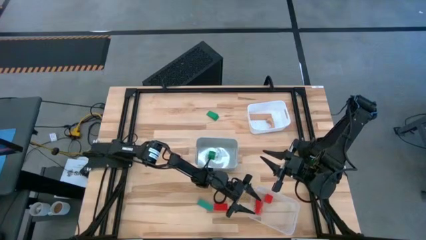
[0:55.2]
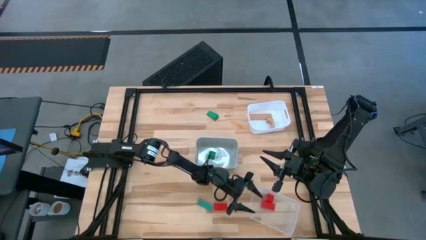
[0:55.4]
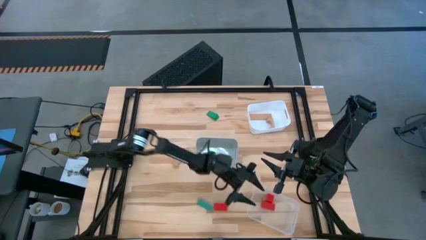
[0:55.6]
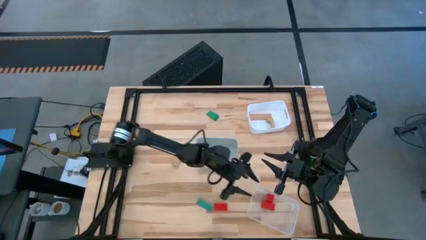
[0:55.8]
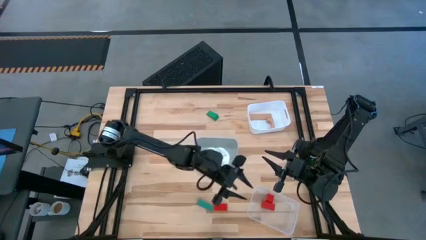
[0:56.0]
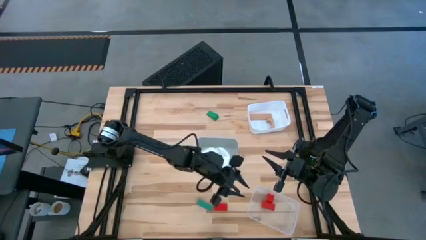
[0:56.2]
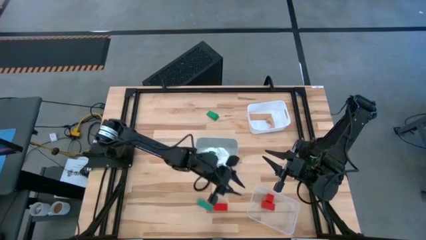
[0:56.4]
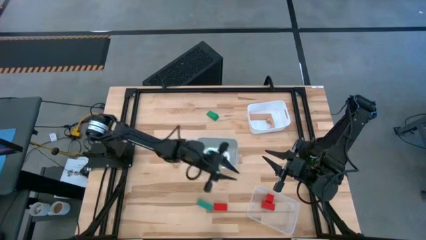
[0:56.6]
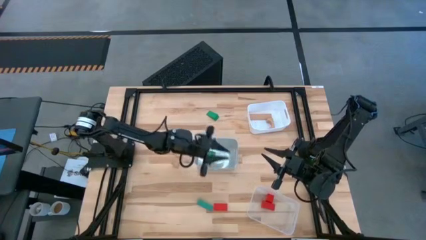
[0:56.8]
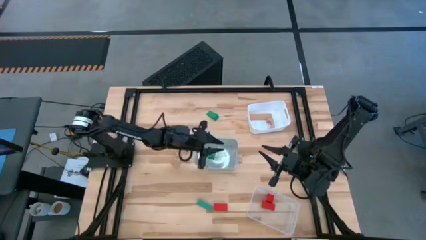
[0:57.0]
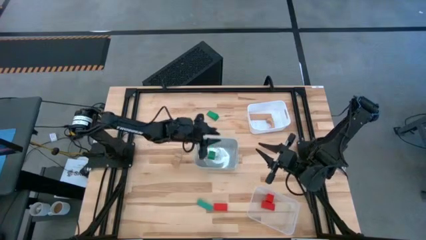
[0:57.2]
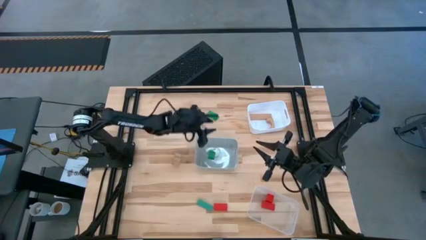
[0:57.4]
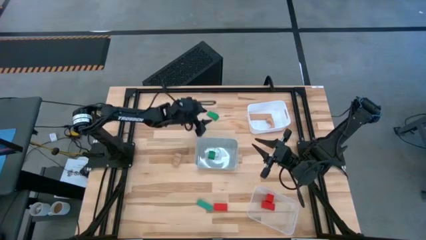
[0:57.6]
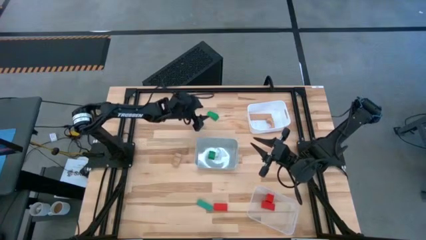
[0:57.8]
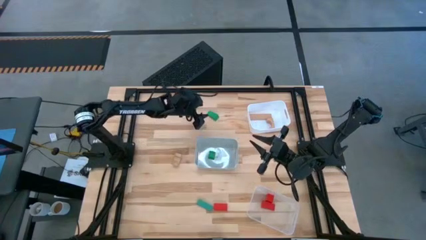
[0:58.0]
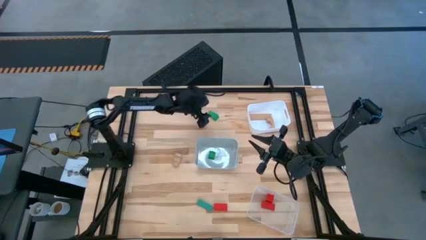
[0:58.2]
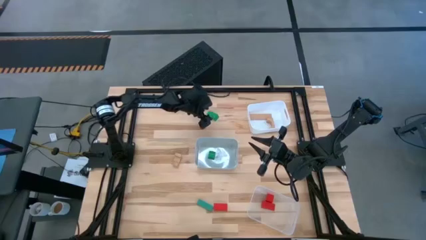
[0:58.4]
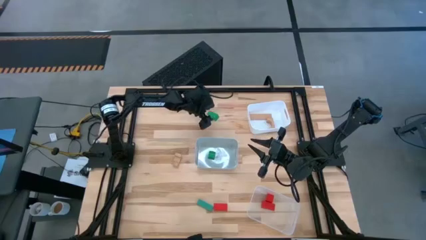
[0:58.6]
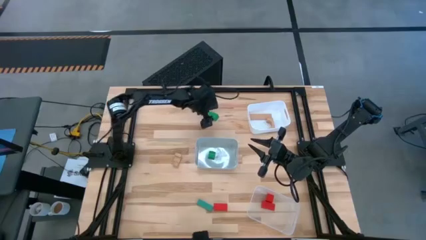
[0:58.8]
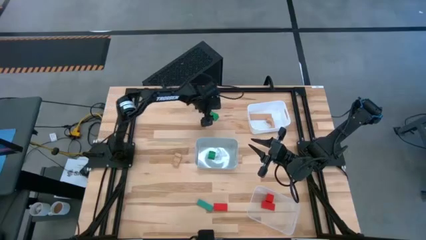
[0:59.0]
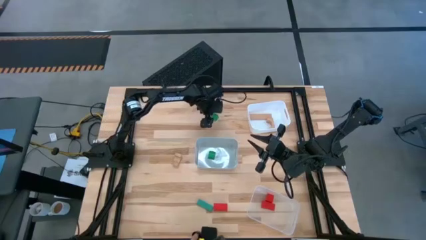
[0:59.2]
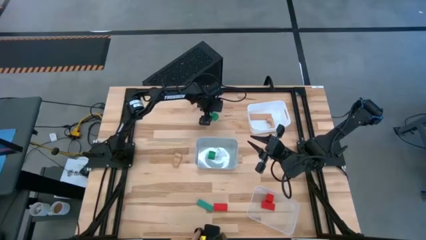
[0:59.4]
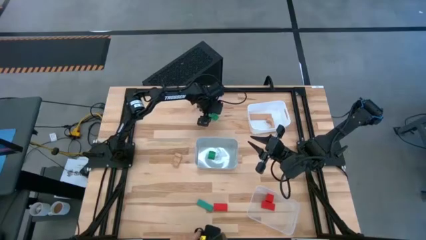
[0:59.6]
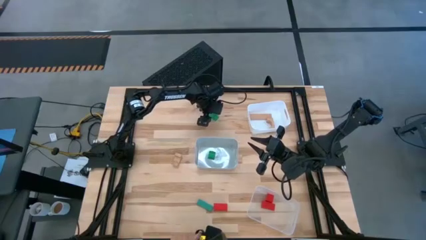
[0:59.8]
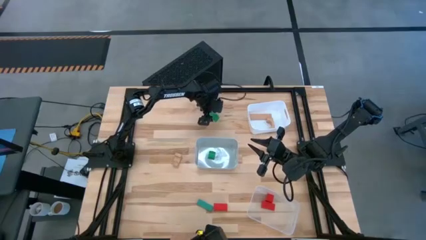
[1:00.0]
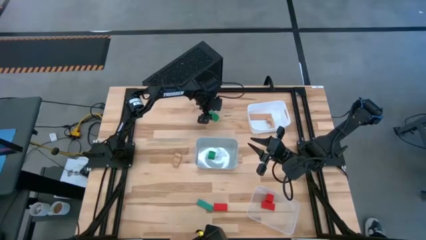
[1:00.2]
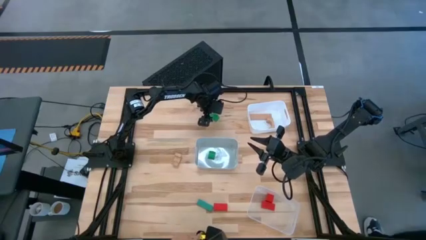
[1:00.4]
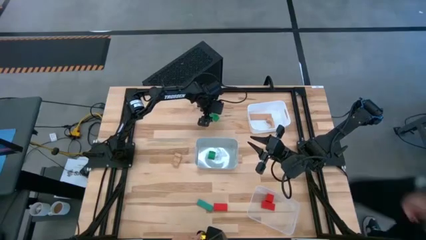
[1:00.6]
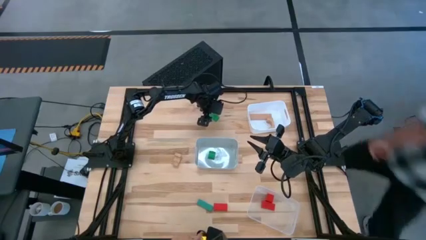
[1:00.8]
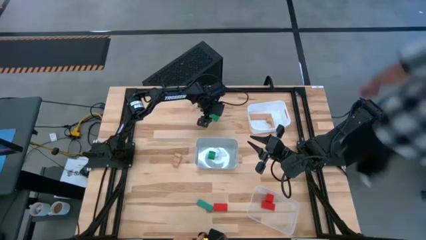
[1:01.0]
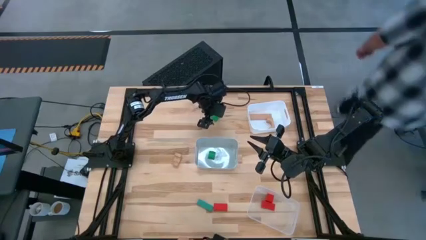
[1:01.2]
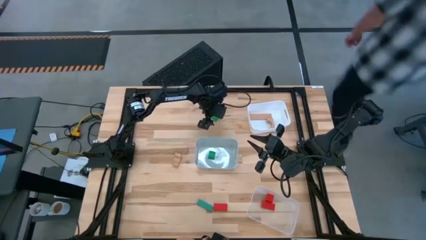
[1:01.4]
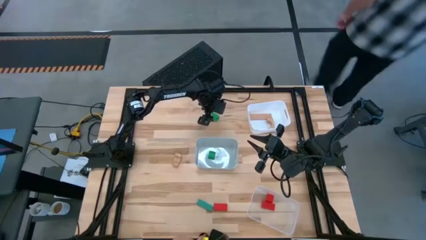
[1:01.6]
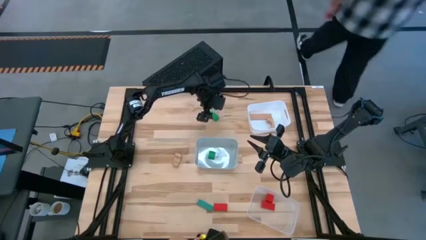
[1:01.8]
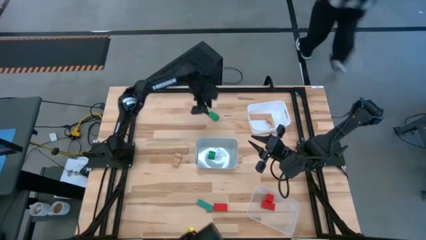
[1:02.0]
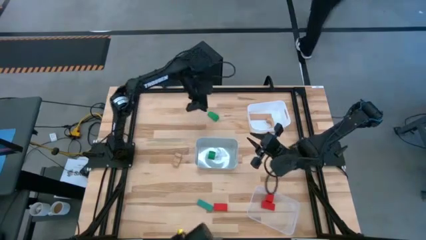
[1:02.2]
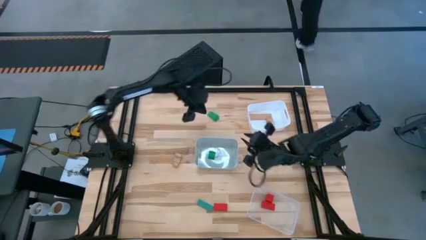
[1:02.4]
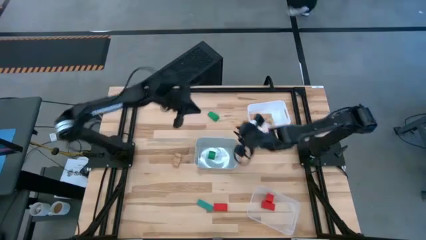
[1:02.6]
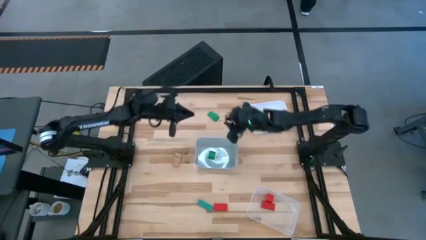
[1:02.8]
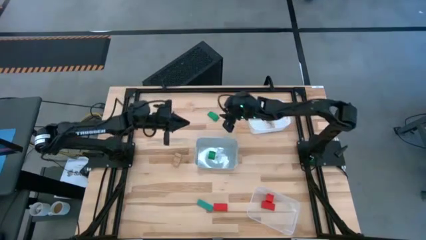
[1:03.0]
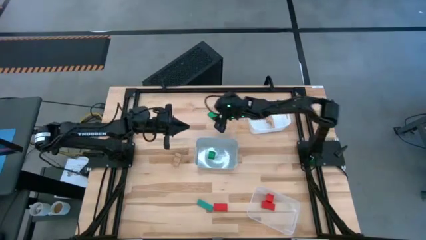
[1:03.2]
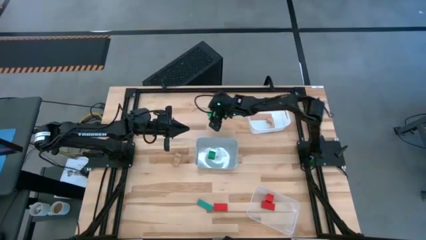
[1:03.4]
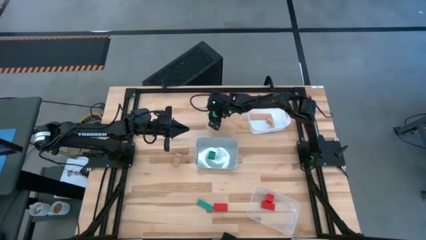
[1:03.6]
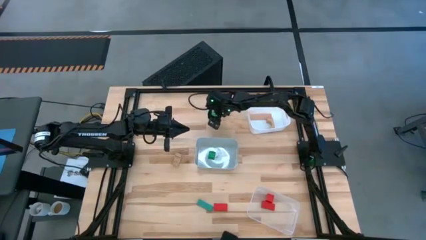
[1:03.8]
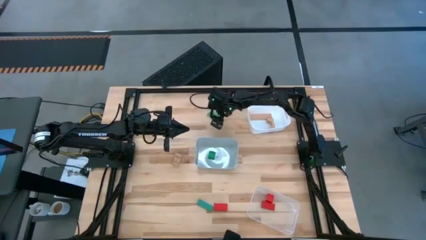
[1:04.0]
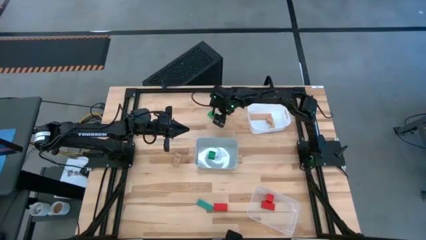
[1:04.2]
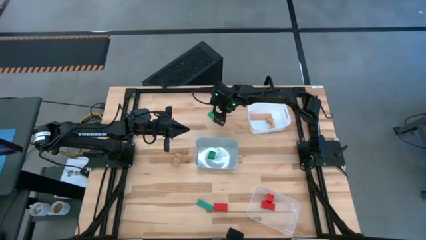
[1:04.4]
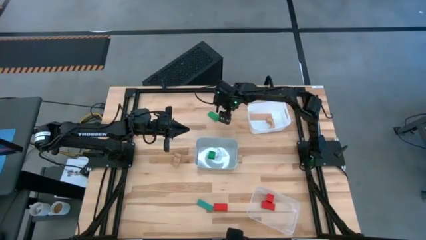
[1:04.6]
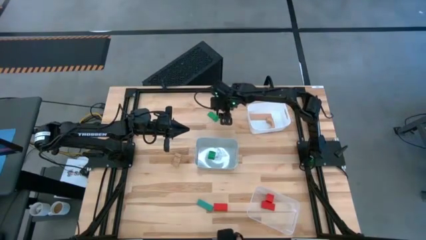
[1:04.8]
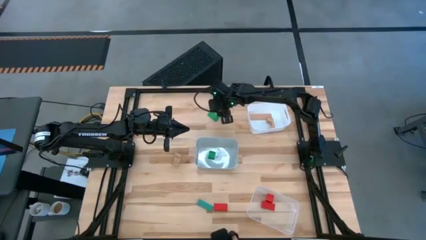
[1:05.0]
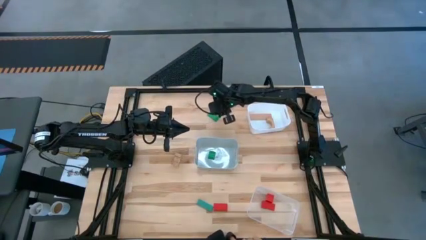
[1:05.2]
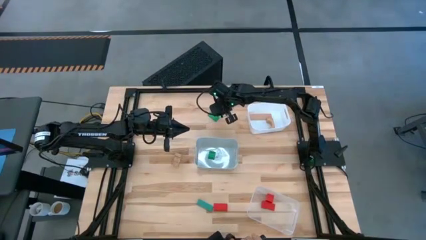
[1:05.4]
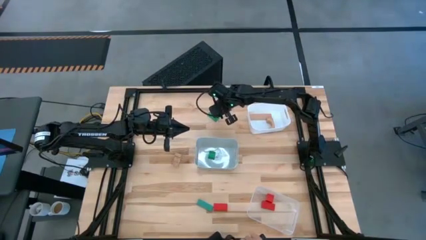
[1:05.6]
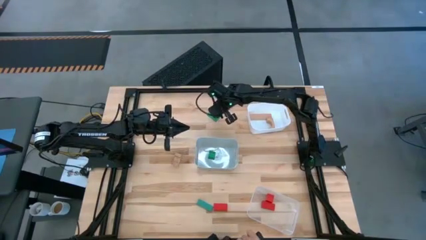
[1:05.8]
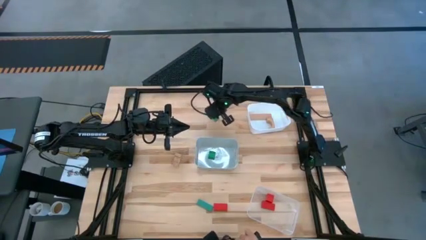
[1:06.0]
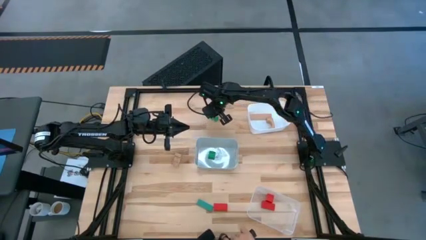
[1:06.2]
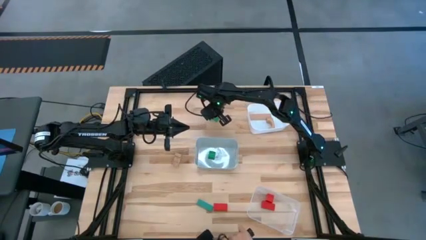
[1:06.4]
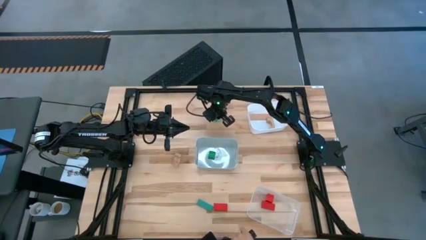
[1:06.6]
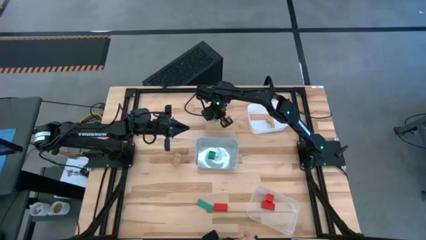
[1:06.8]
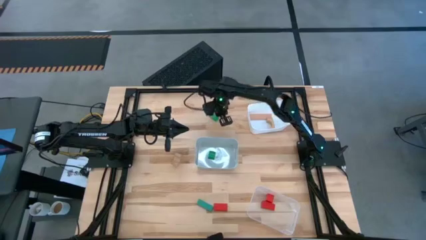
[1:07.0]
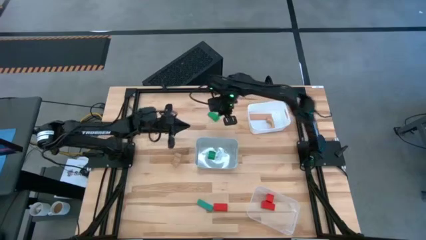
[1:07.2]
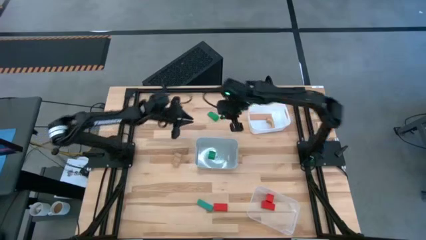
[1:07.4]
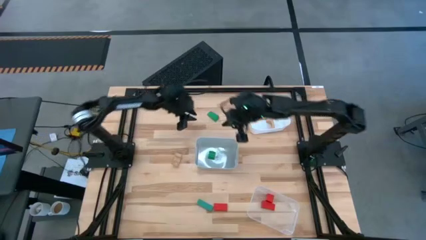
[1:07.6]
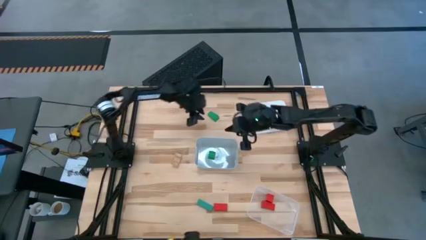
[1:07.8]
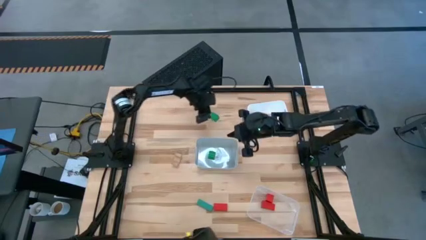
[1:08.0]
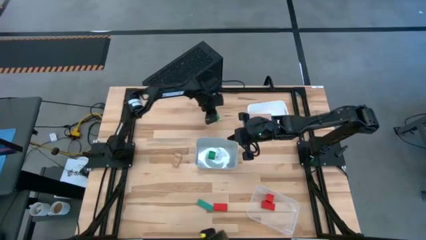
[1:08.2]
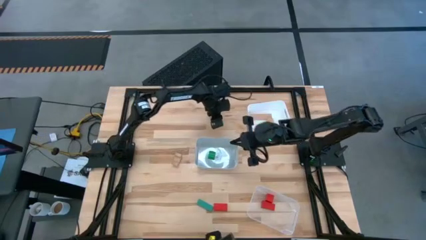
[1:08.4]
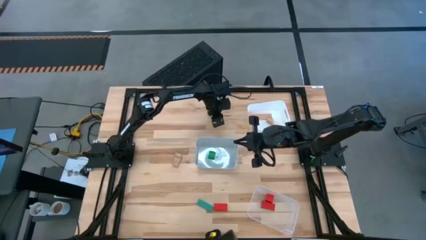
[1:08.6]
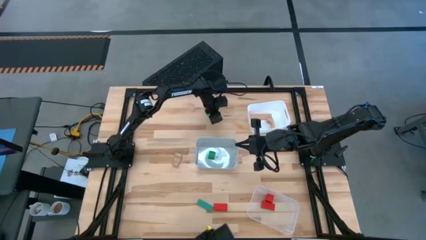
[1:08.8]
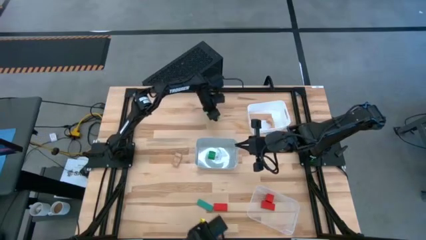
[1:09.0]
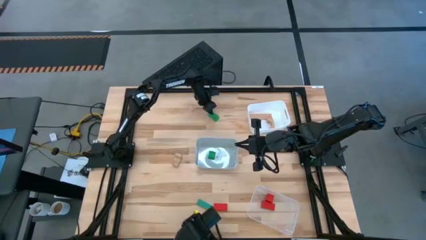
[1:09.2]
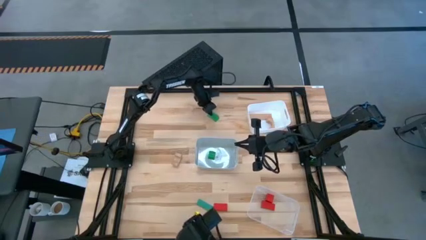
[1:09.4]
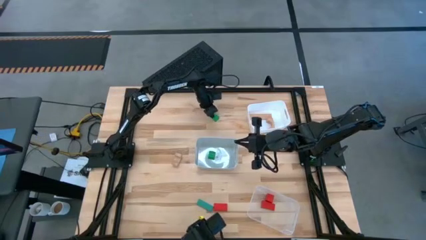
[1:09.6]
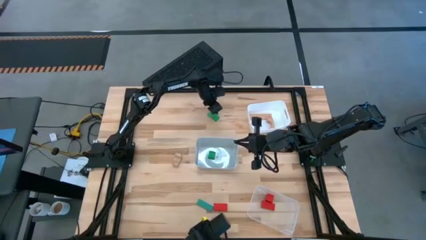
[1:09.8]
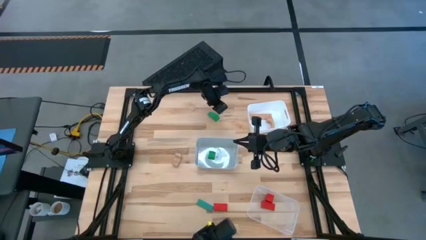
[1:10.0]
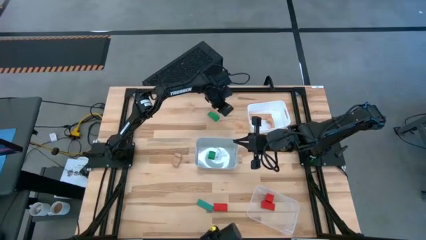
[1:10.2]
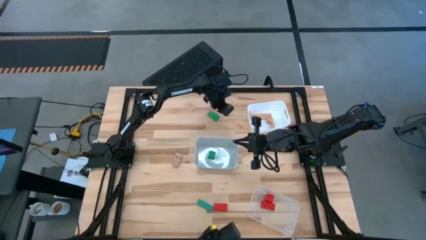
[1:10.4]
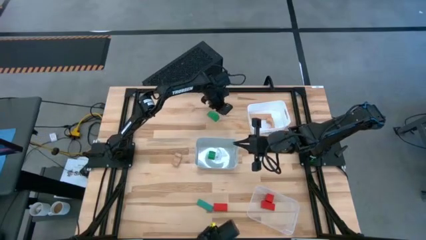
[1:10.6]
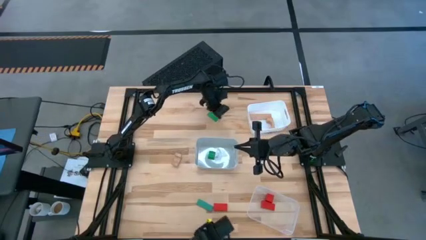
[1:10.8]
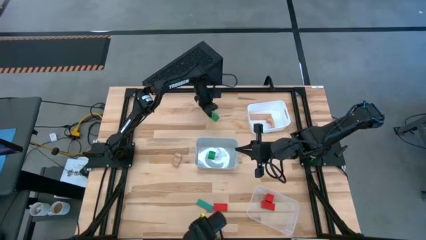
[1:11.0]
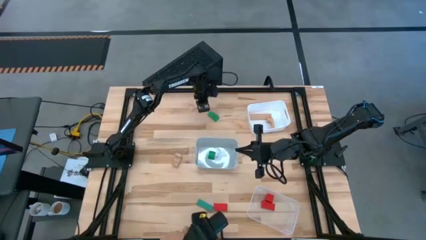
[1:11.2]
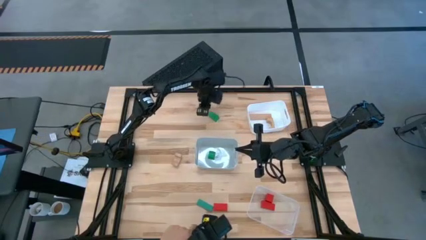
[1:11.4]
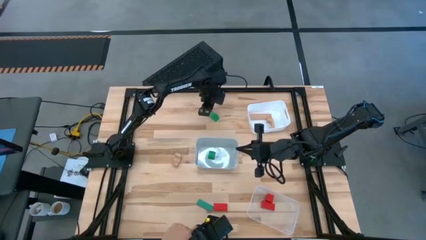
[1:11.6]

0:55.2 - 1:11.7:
Task: Sort & place blocks by color
Put the top green block into the gray bin
